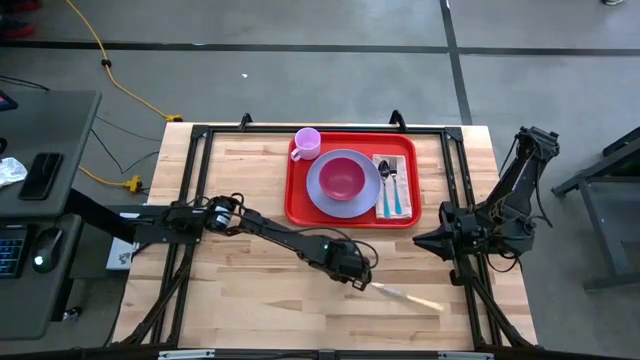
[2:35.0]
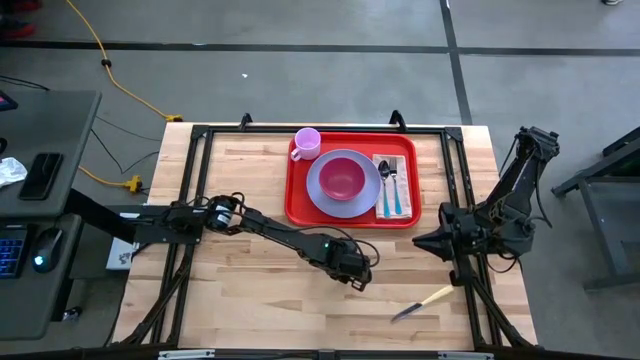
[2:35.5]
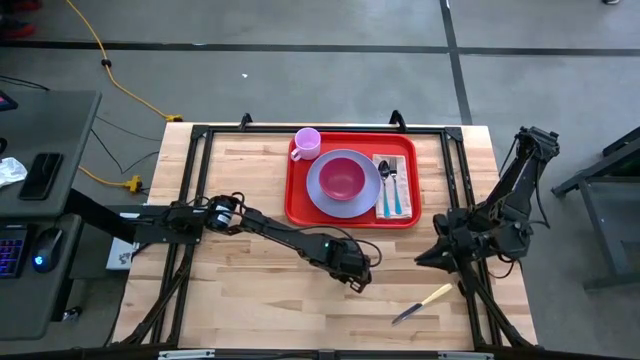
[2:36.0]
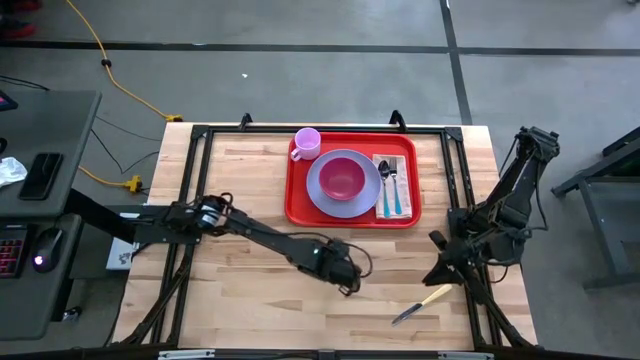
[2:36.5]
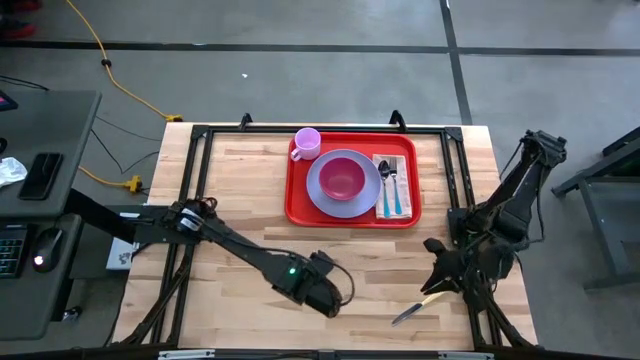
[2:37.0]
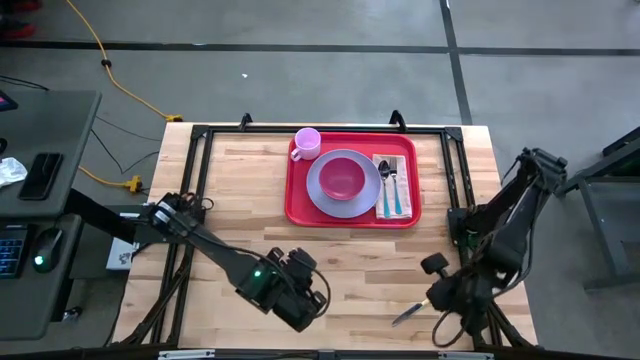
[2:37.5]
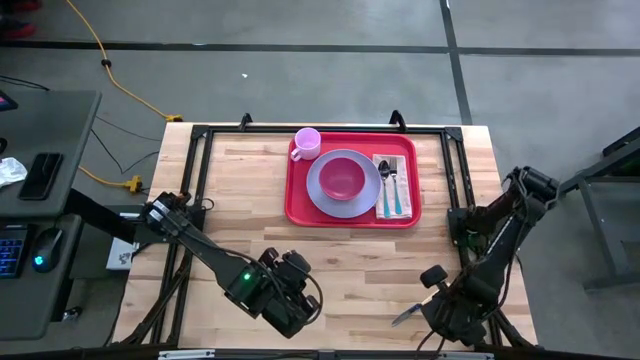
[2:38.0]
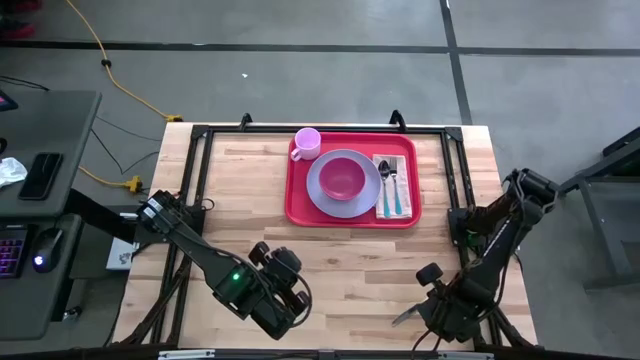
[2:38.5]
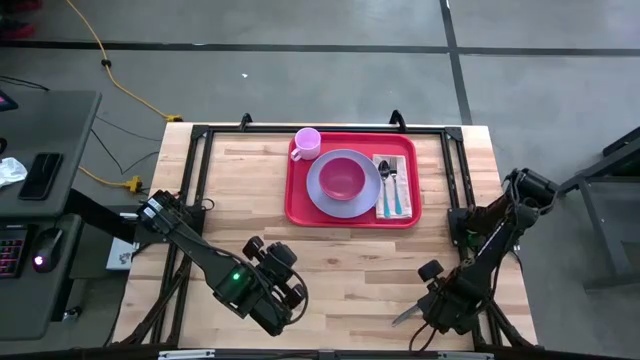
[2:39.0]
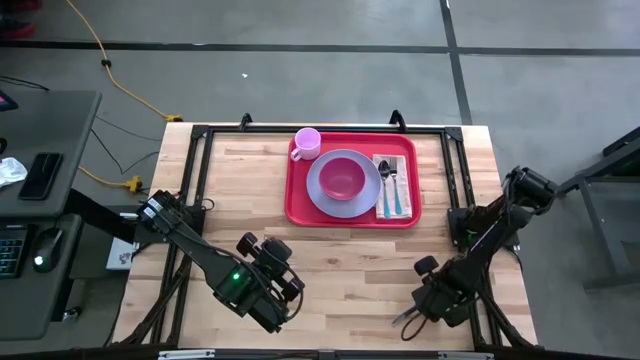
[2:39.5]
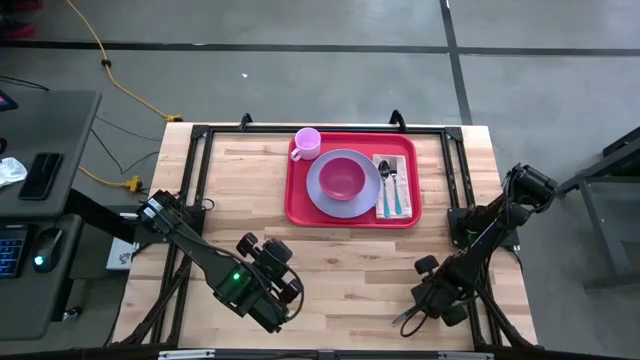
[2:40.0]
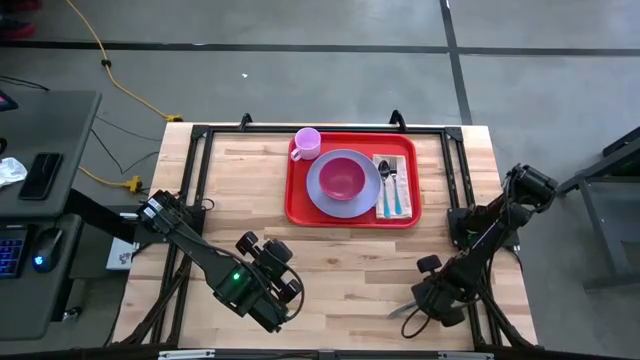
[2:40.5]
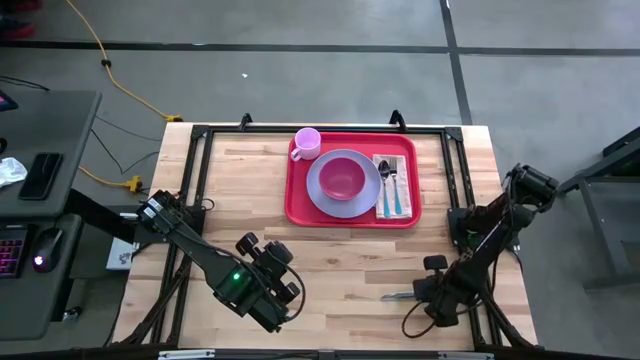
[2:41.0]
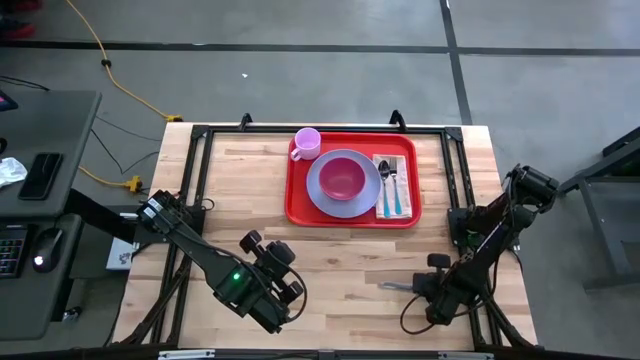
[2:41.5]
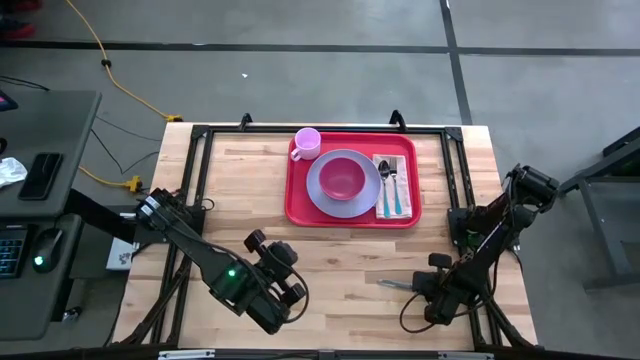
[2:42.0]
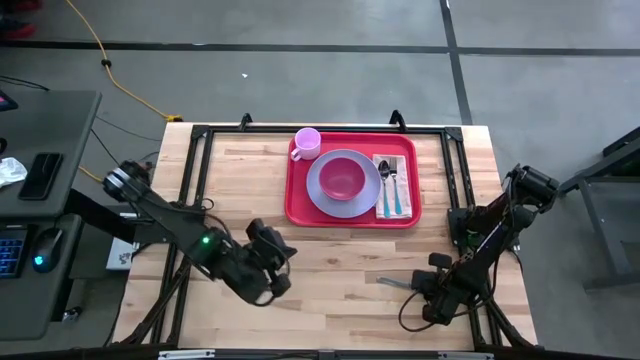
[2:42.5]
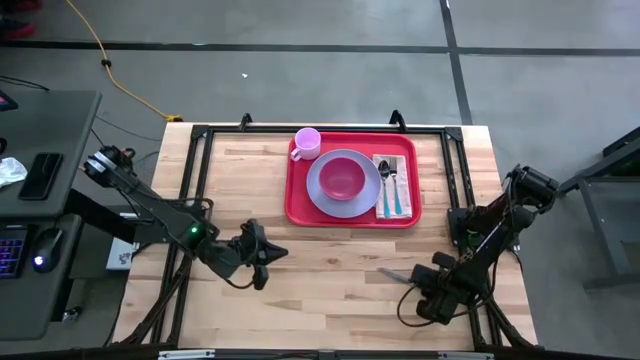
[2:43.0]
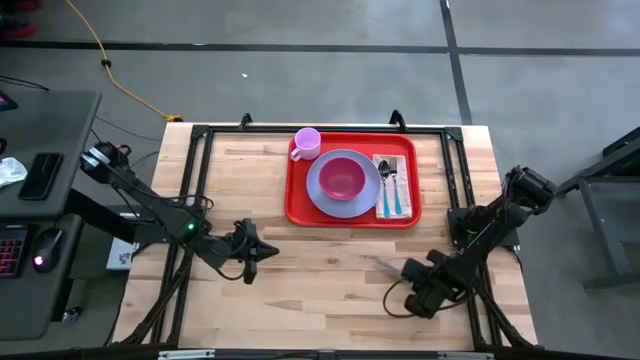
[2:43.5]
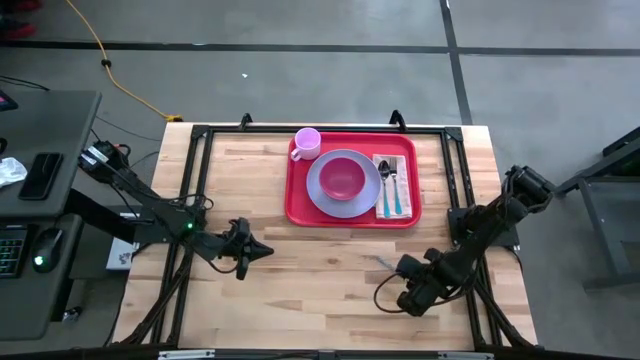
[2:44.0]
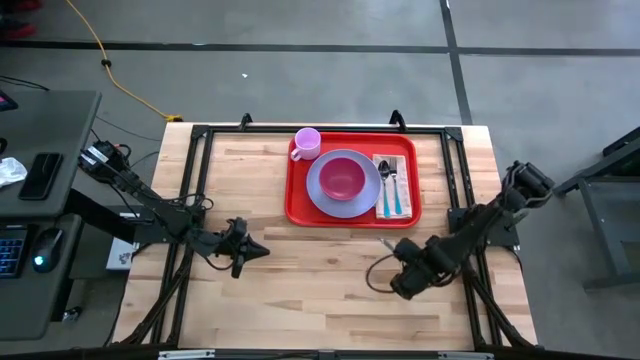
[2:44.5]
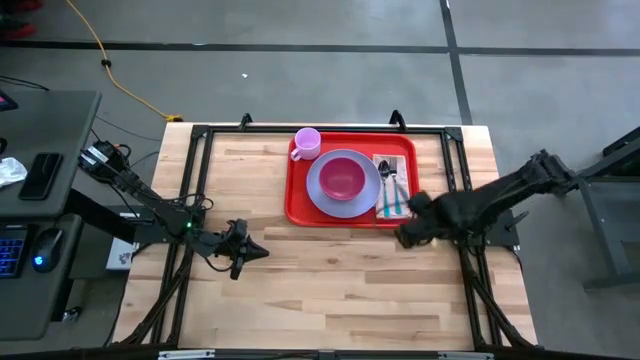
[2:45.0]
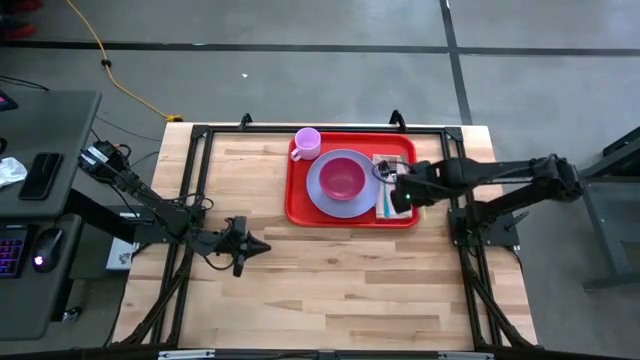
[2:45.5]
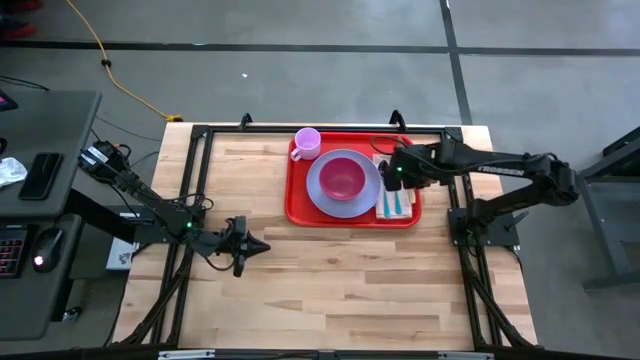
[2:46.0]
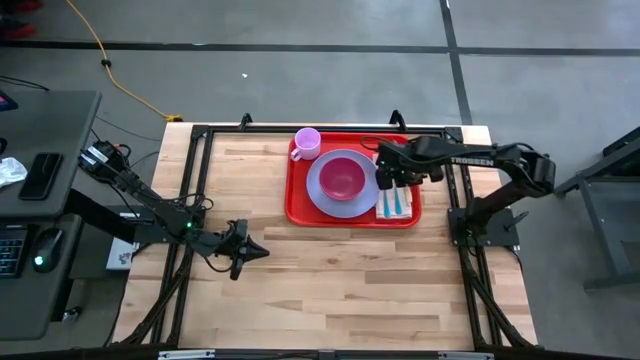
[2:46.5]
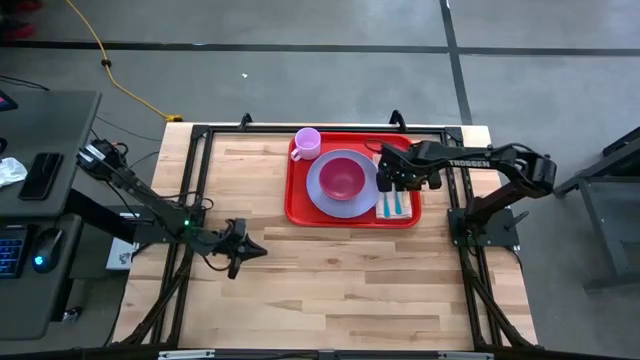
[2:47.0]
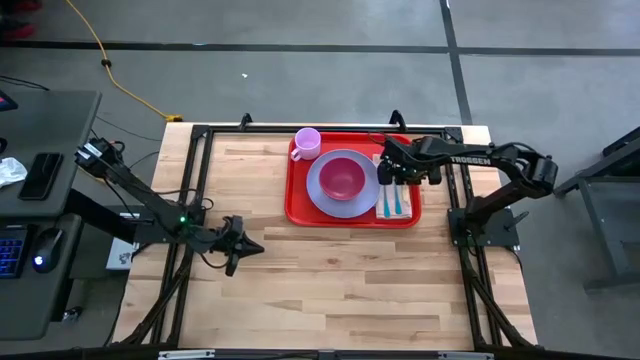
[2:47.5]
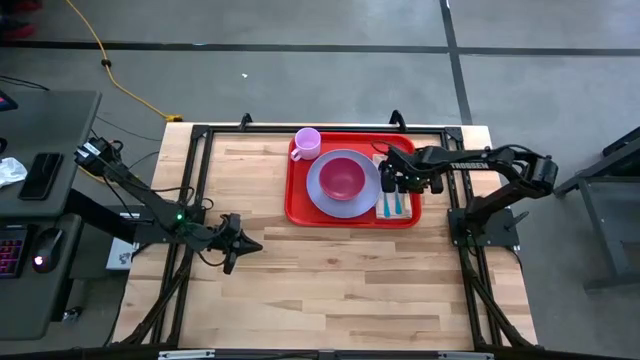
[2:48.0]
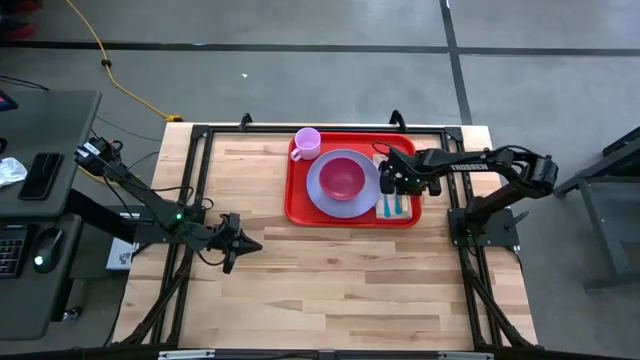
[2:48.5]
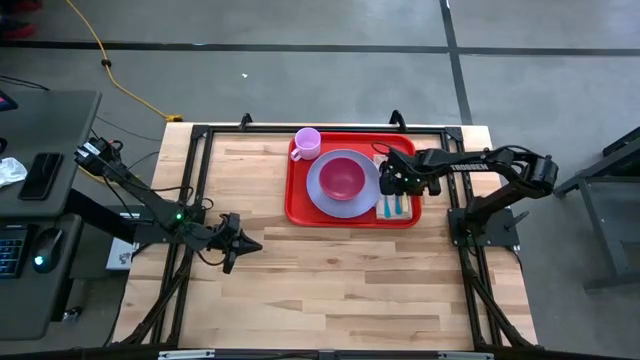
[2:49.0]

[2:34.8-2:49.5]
Task: Set up tray
Put the knife to the right of the blue fork on top of the white napkin on the serving tray

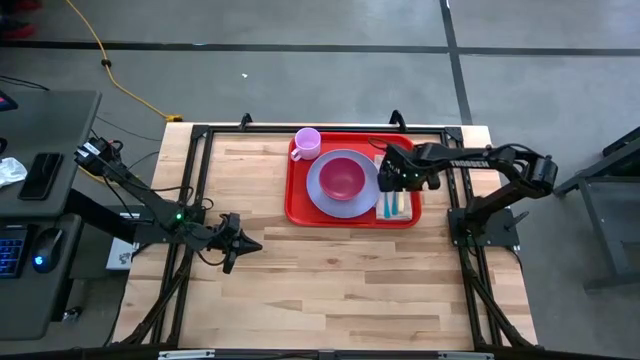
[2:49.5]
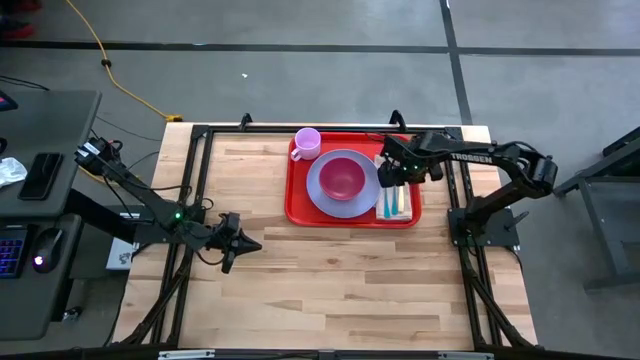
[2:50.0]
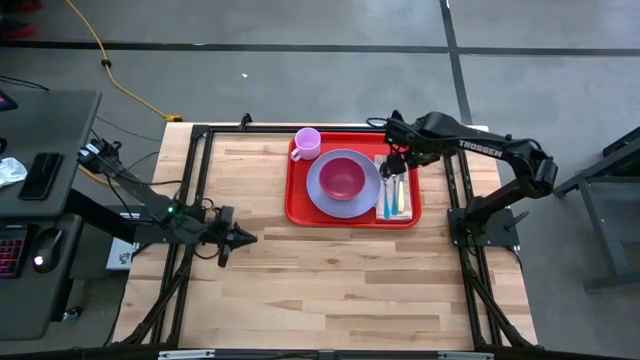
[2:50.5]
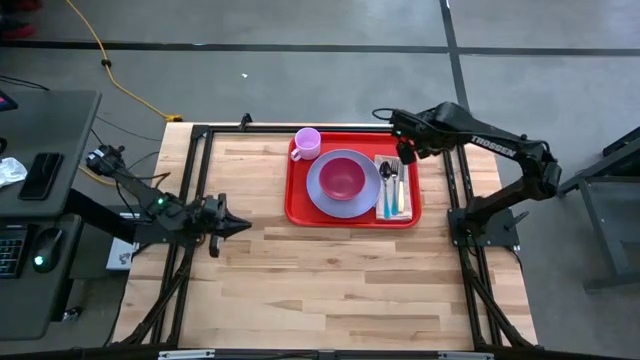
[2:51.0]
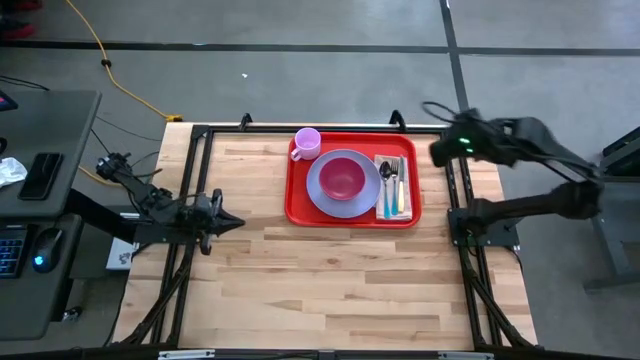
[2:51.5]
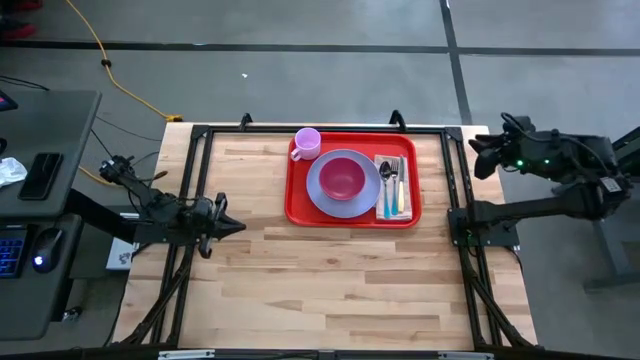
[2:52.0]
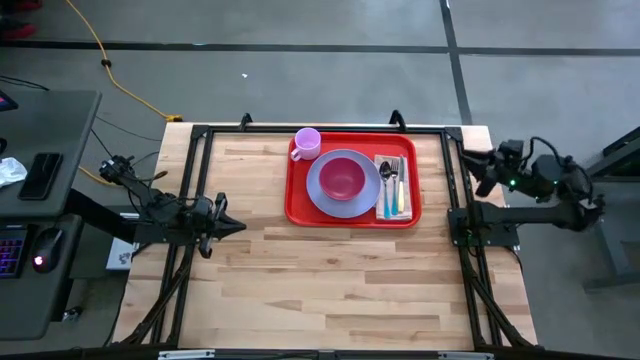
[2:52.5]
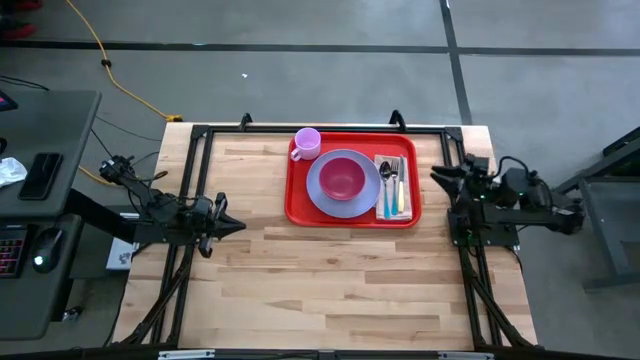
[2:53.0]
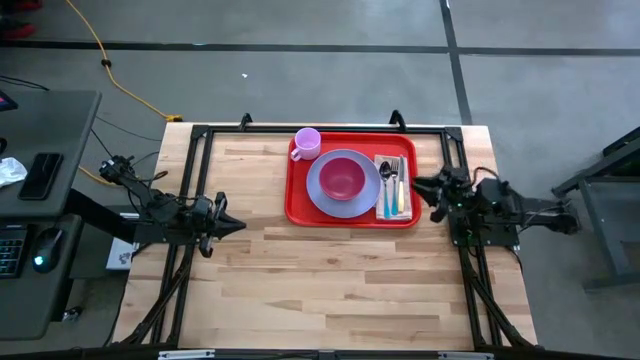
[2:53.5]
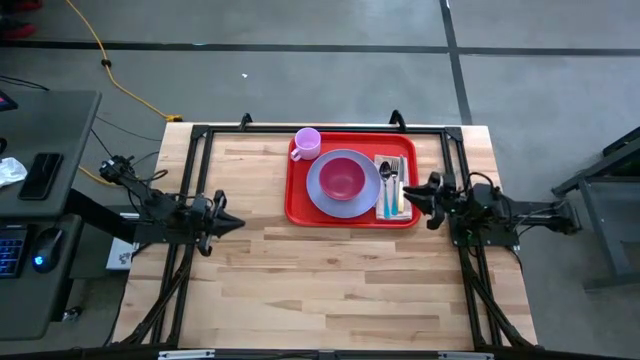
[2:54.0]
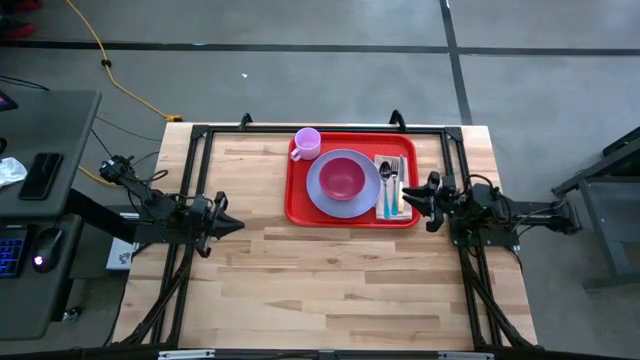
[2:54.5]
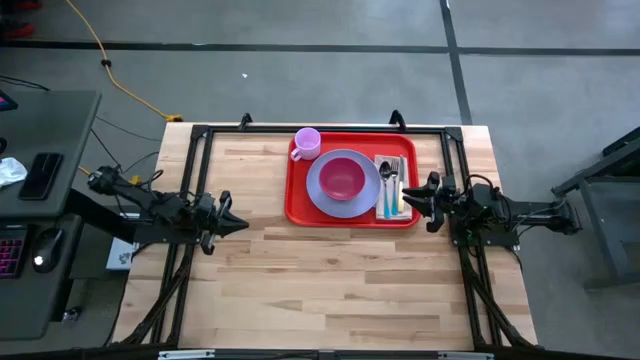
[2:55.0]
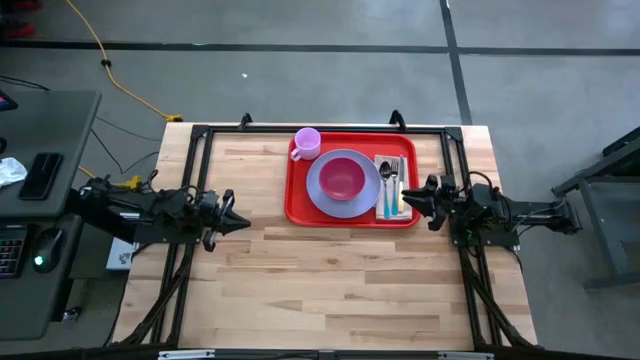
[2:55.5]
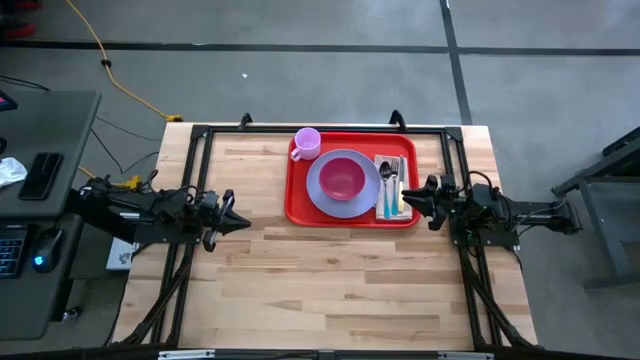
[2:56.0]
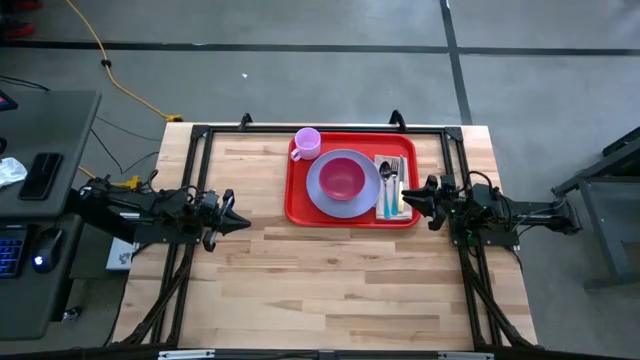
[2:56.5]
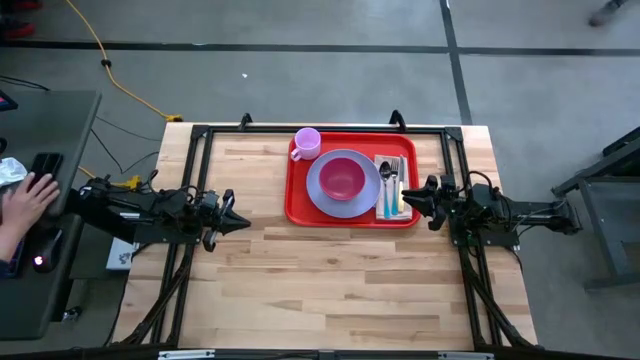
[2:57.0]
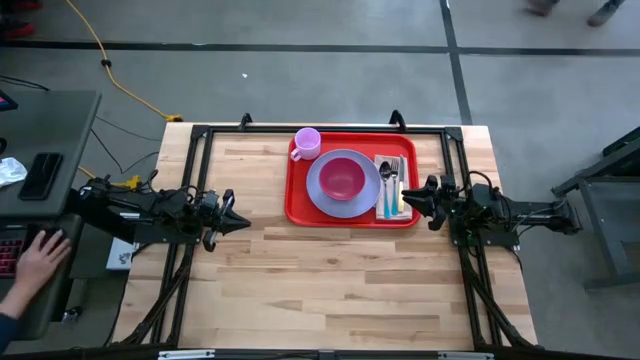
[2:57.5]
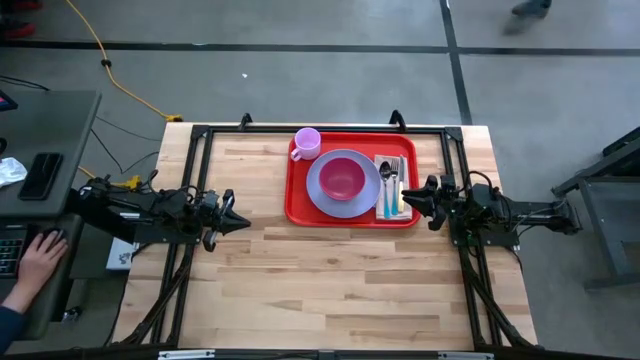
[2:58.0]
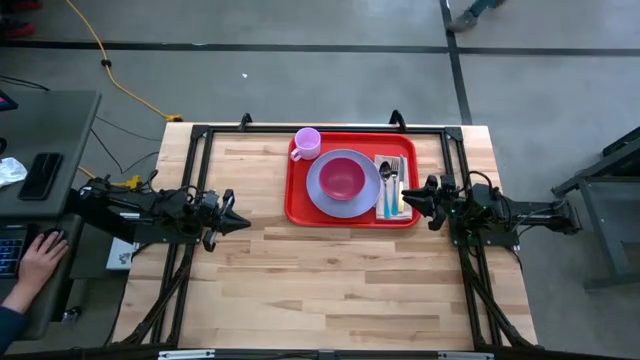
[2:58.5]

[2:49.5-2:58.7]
Return to Home Position
